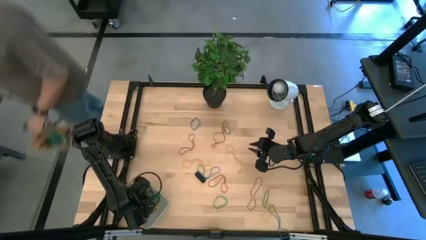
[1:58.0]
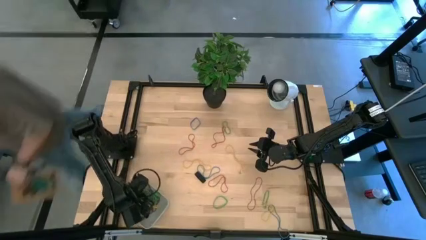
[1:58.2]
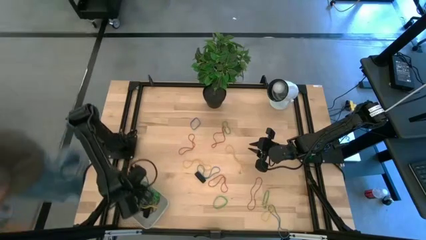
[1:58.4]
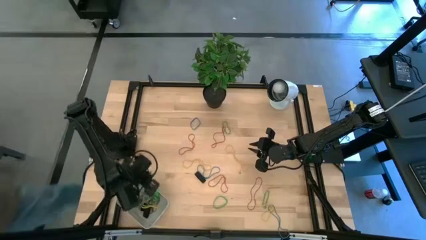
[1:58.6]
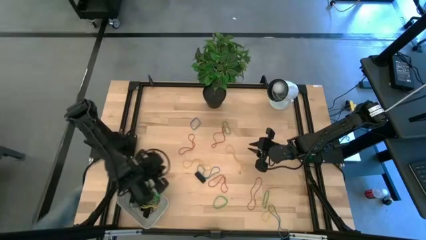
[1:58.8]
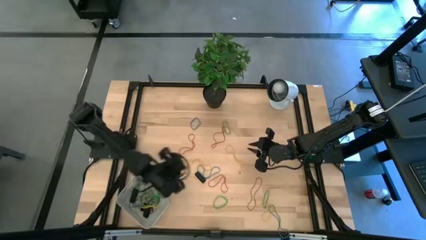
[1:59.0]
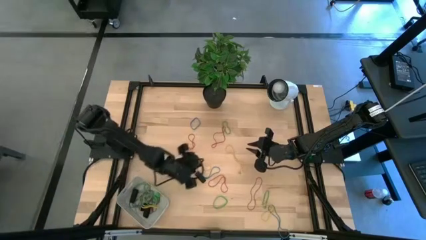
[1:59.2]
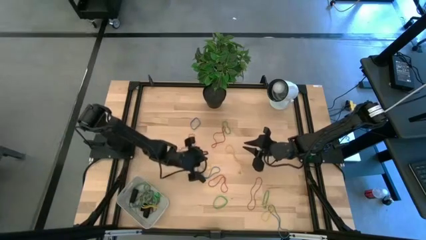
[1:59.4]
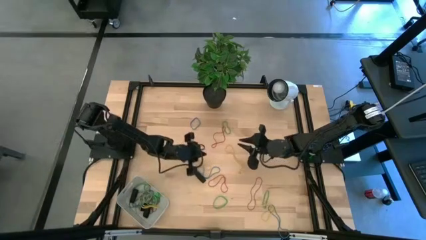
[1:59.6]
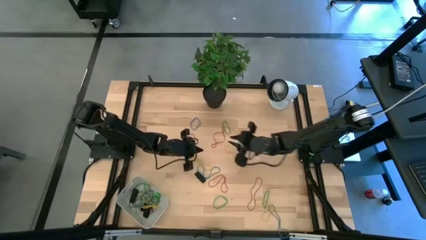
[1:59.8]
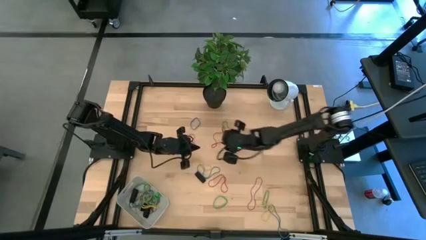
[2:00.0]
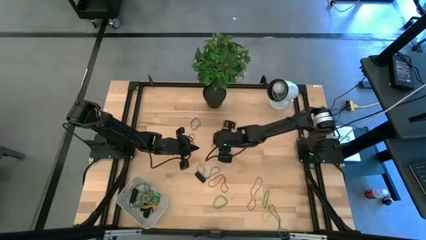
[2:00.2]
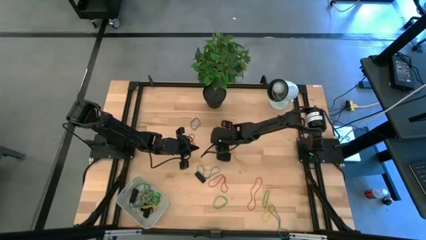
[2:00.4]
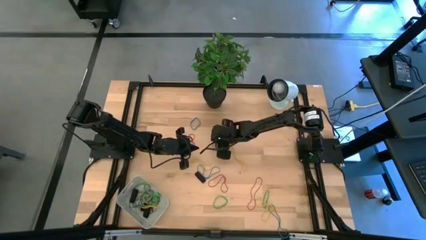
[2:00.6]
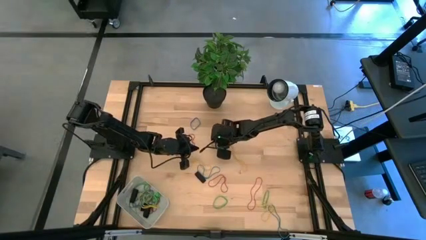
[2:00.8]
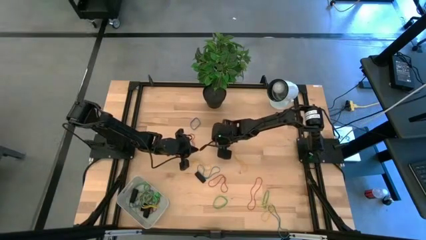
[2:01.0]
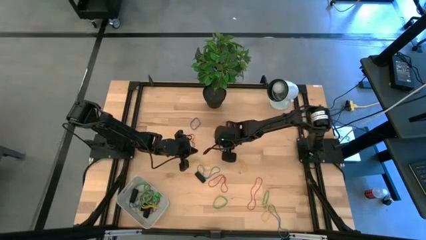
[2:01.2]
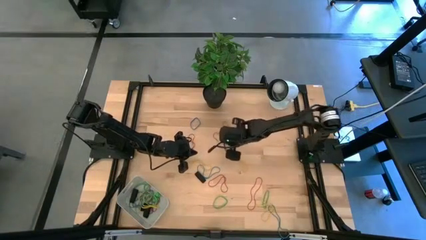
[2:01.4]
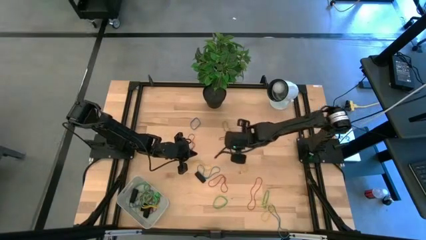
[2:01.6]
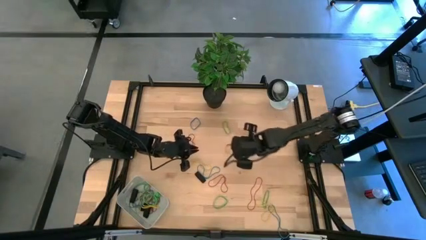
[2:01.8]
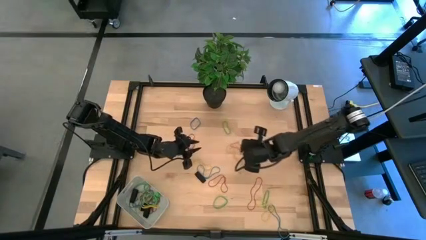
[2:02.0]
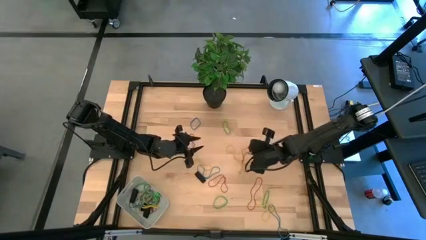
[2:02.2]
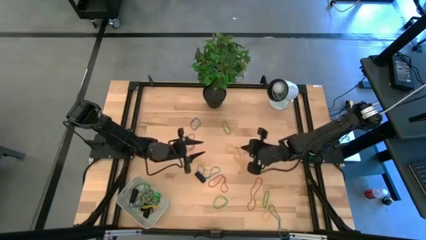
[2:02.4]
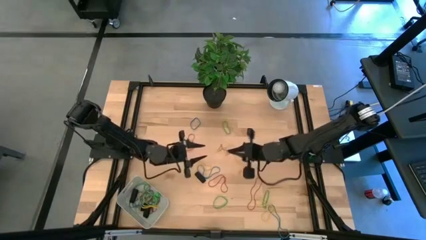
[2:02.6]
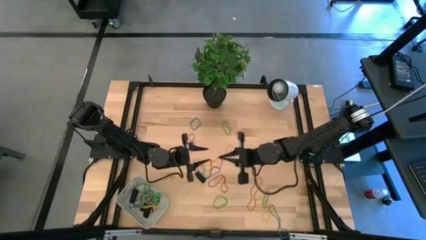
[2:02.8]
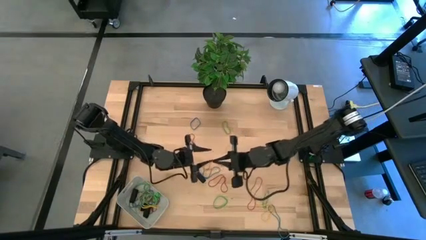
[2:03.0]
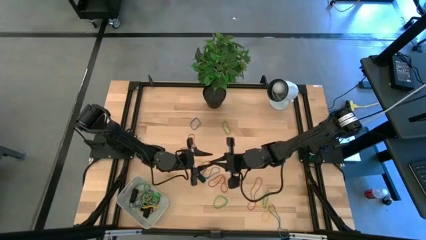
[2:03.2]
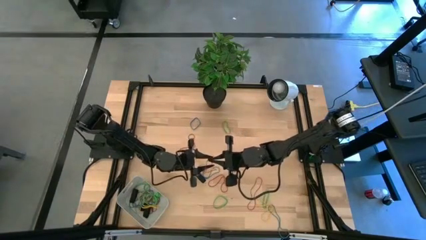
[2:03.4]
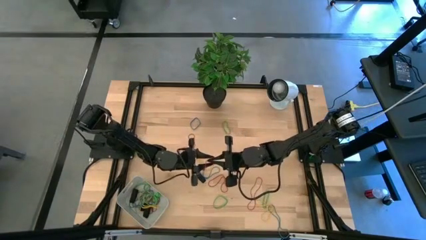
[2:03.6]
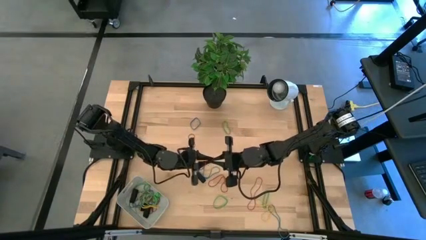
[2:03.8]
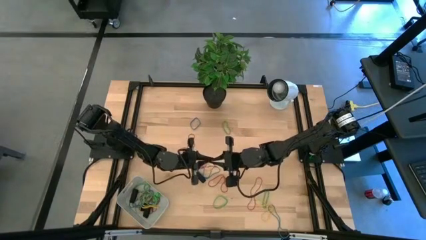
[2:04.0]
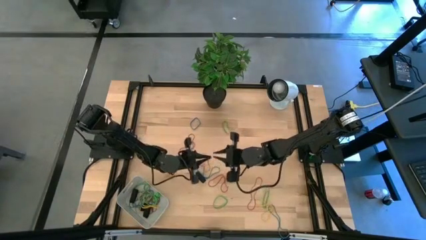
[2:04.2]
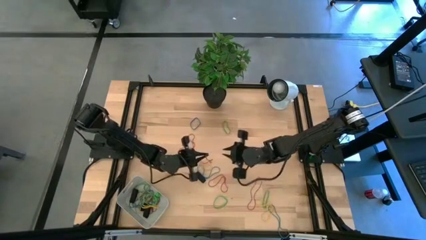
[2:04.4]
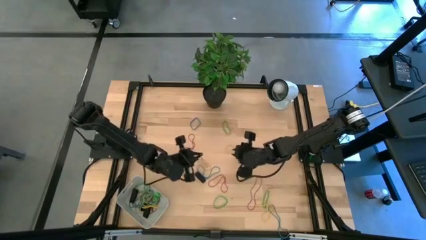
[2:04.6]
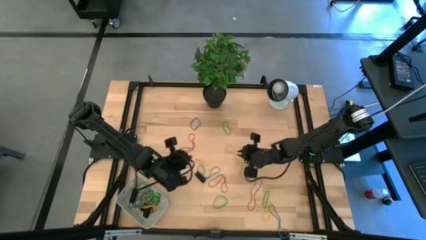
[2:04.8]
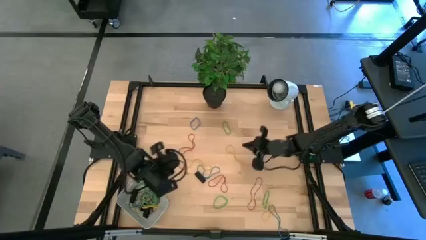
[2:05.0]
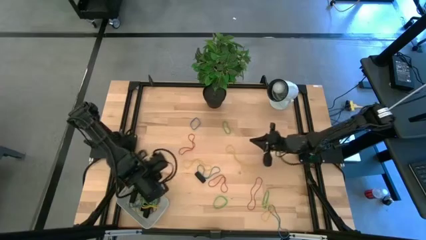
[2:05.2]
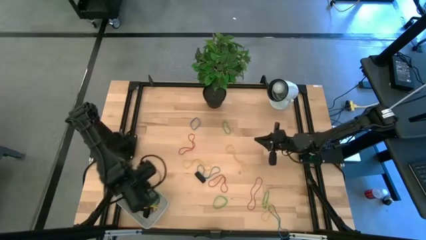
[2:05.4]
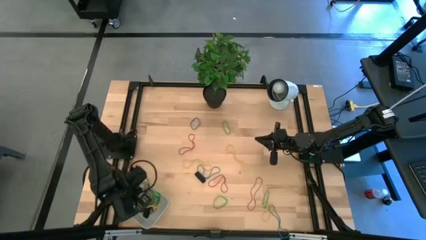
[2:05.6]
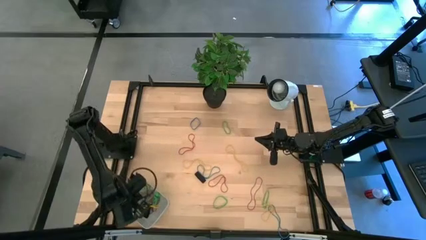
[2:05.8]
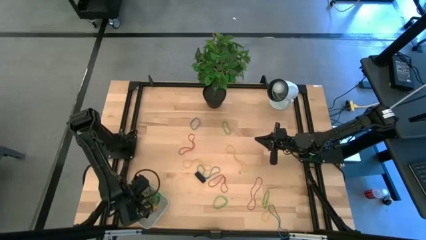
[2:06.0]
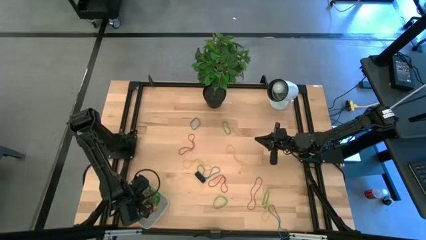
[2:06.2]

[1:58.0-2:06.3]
Task: Pick and place rubber bands into bin
Put the red rubber band into the gray bin

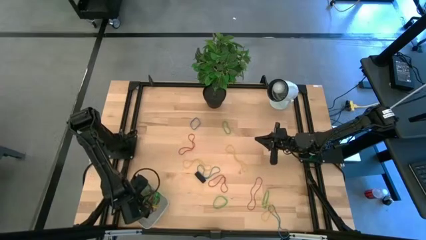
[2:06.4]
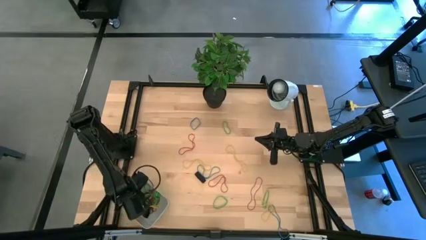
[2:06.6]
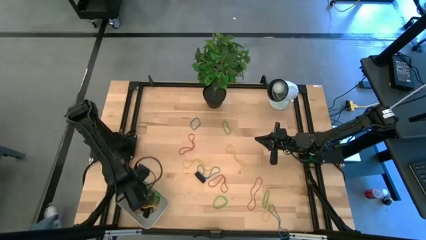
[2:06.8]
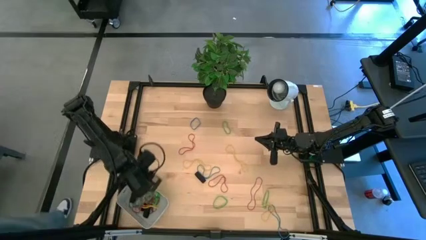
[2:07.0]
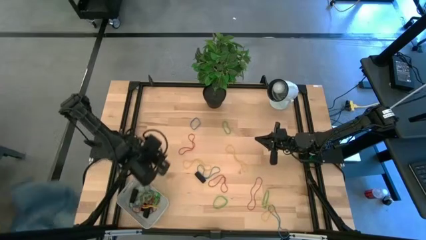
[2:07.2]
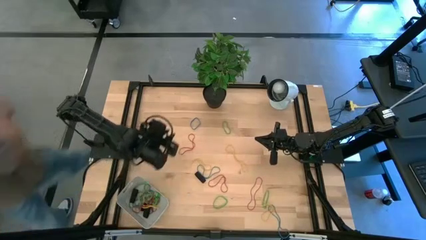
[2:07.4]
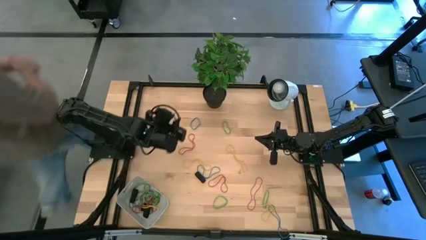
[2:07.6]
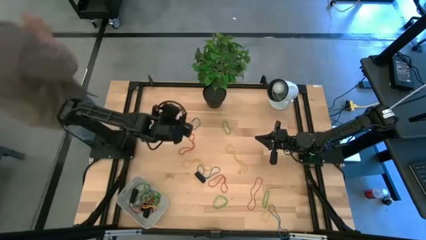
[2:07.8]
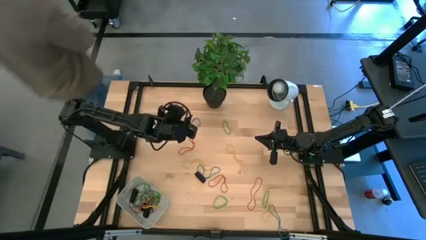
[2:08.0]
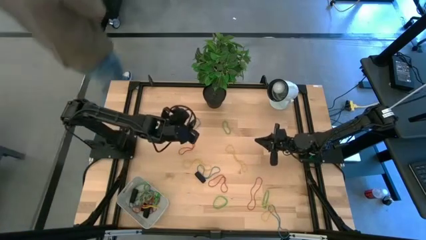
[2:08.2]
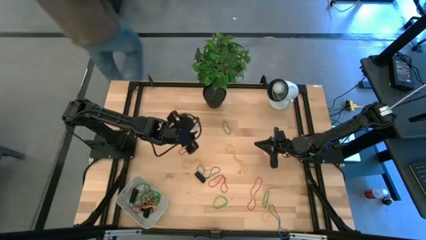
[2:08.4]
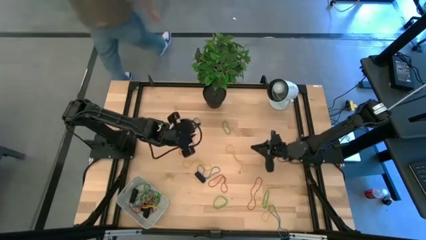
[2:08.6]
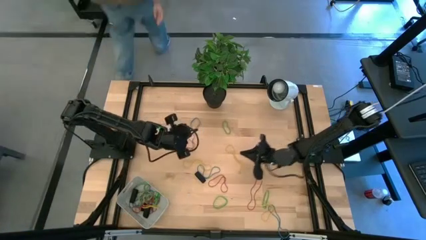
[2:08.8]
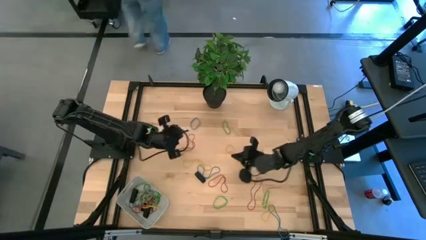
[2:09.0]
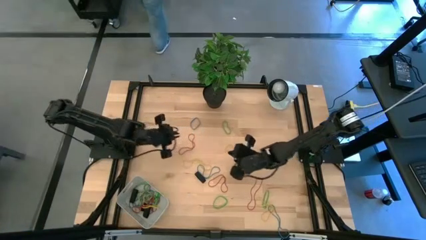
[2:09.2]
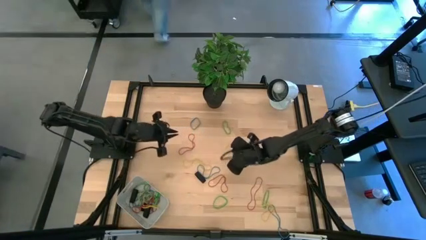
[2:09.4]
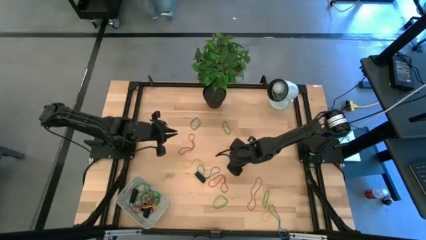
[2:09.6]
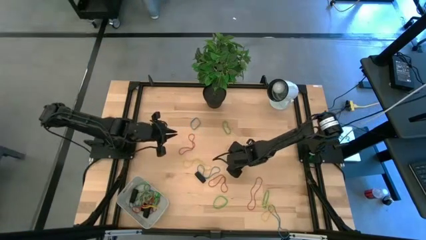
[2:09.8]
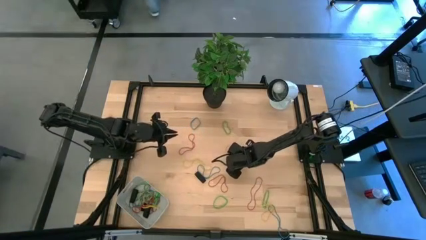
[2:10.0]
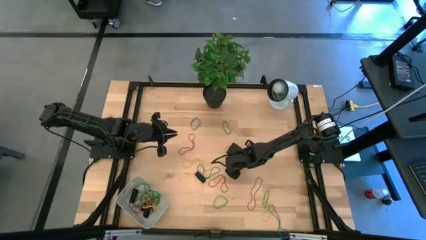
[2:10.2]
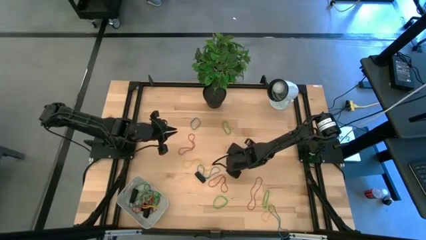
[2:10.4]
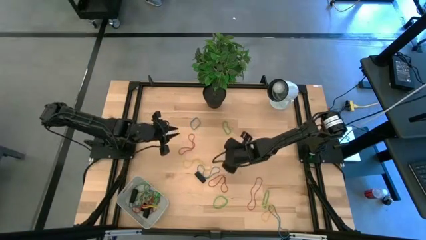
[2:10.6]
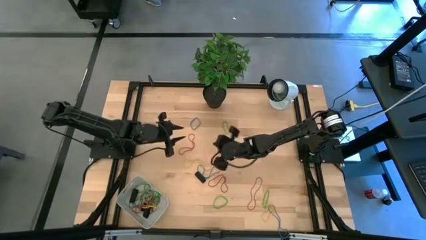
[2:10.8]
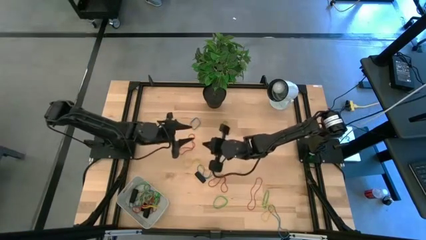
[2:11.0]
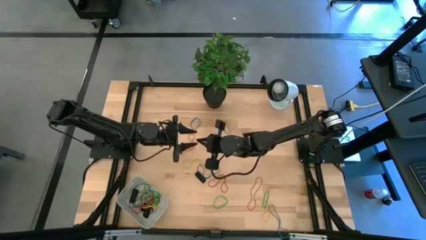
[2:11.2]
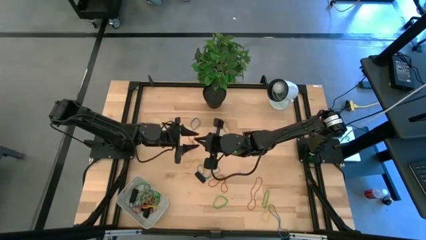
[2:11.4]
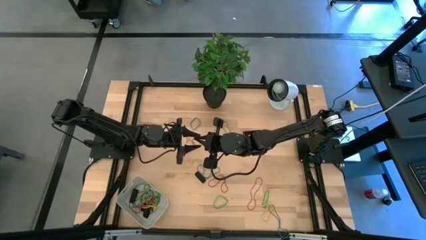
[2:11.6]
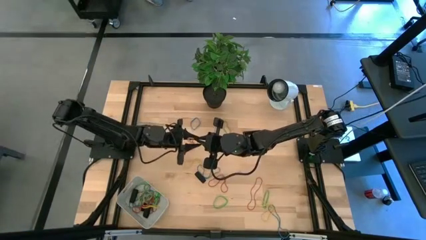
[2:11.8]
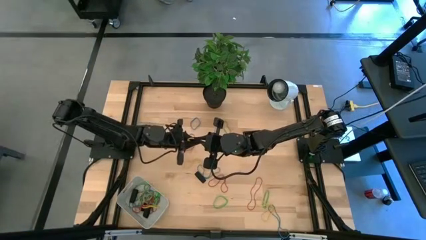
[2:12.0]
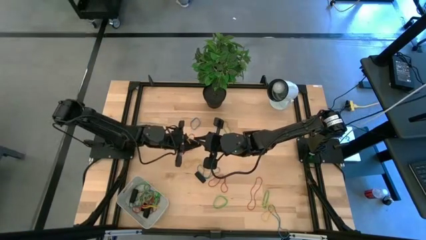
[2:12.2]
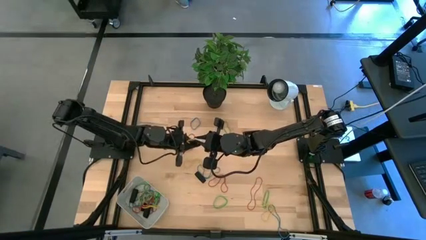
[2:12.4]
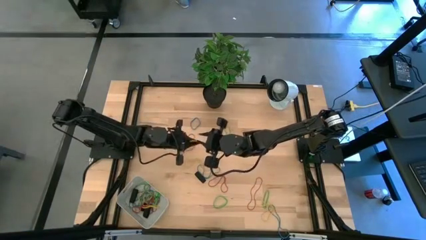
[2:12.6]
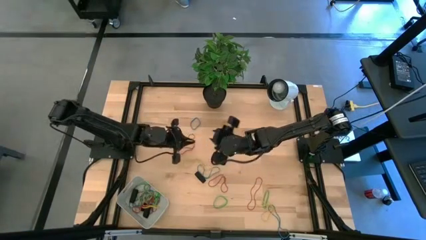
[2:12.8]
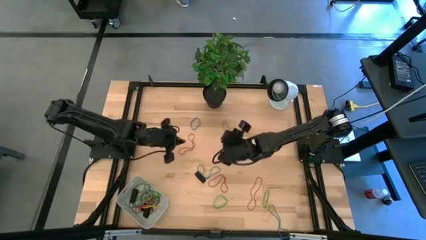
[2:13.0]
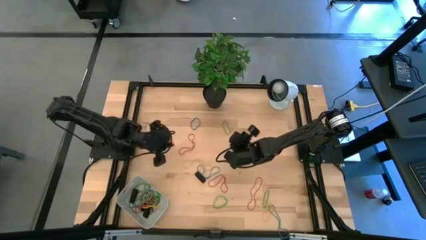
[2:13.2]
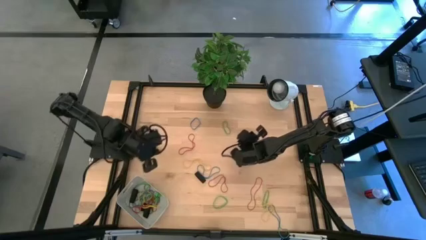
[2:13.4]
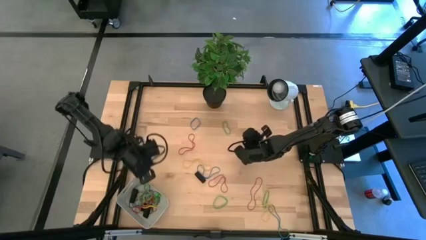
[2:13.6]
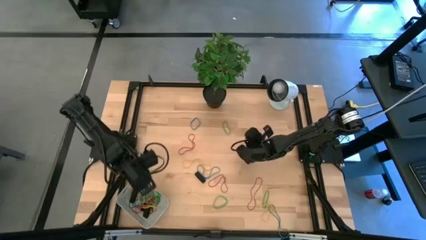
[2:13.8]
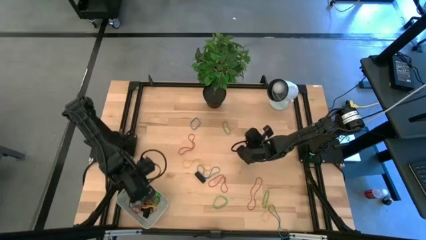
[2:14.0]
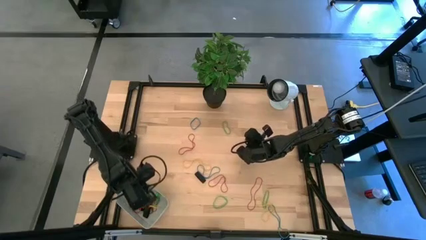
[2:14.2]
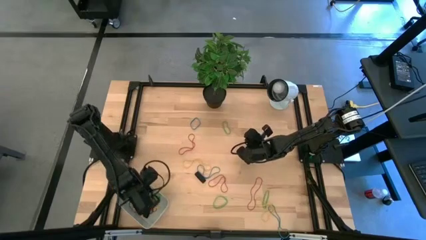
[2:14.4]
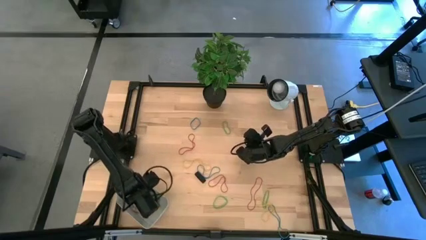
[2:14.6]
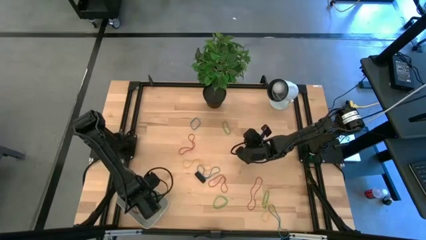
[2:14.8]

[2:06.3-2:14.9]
Put the top right yellow rubber band into the gray bin
